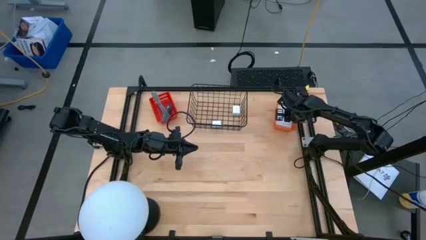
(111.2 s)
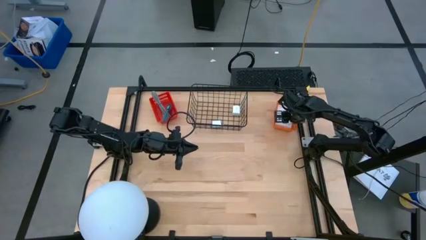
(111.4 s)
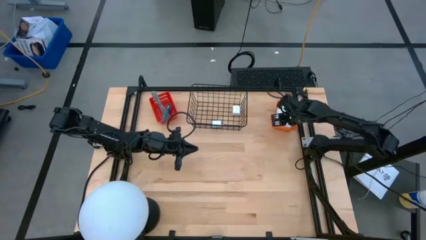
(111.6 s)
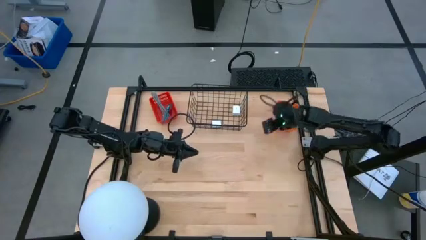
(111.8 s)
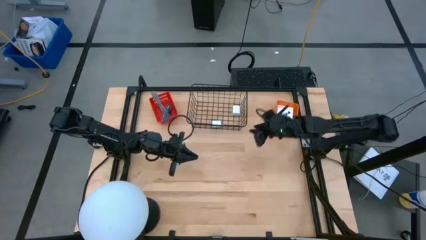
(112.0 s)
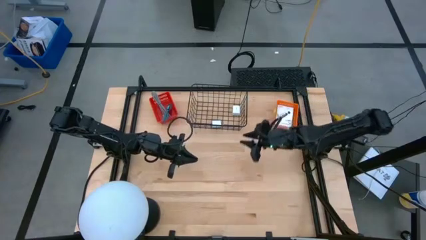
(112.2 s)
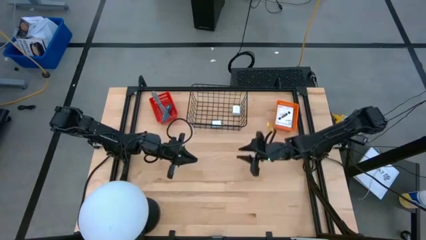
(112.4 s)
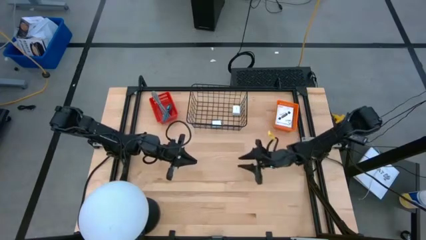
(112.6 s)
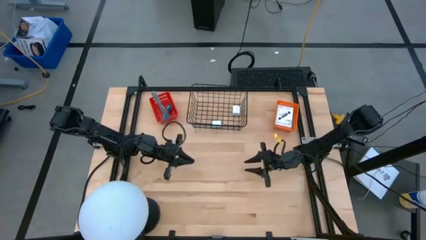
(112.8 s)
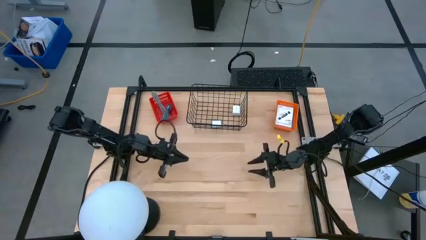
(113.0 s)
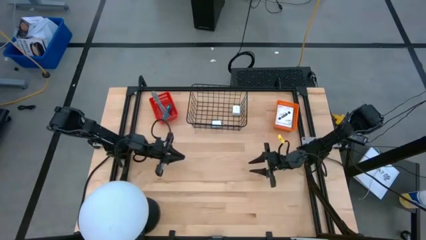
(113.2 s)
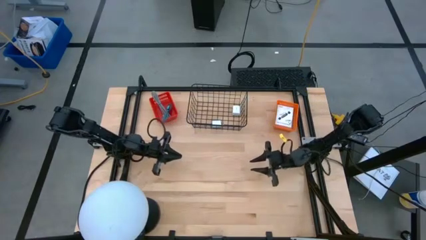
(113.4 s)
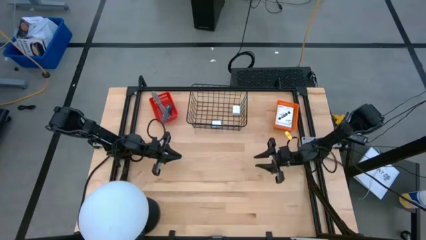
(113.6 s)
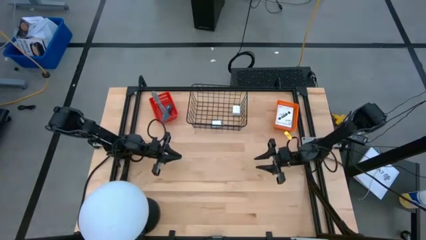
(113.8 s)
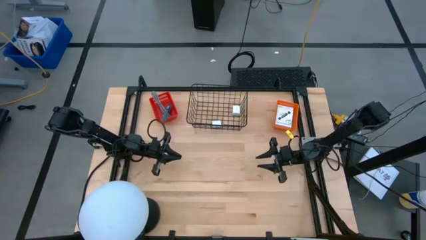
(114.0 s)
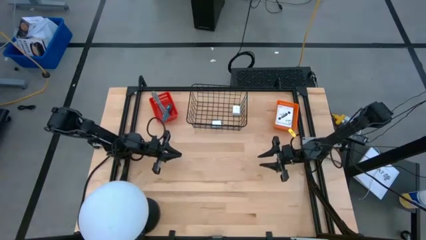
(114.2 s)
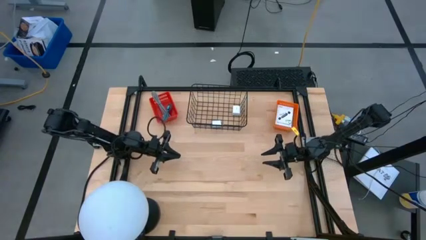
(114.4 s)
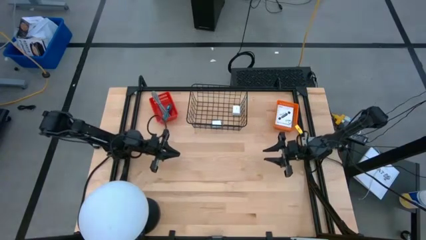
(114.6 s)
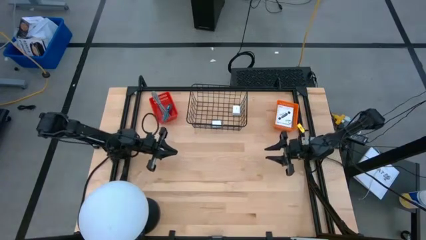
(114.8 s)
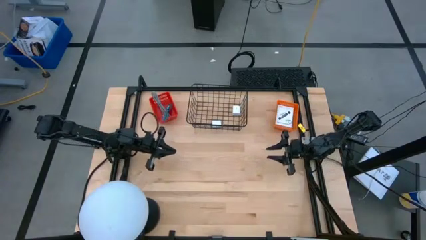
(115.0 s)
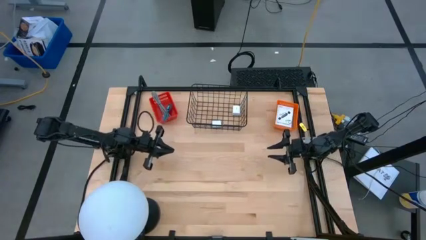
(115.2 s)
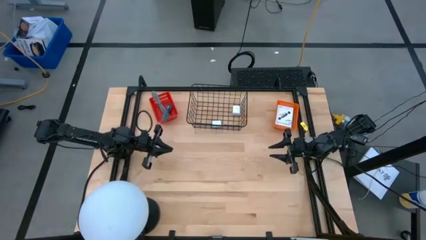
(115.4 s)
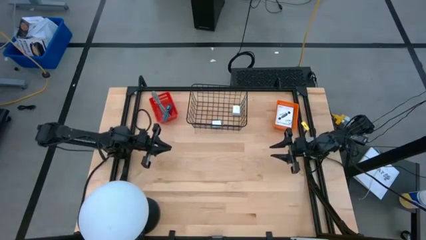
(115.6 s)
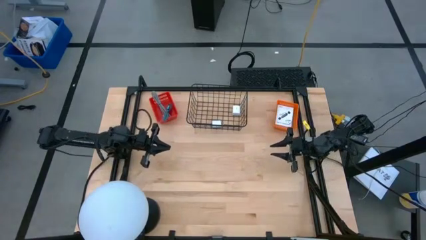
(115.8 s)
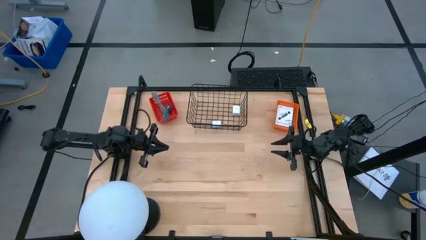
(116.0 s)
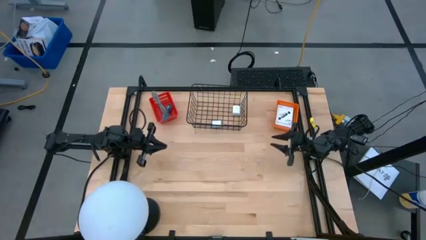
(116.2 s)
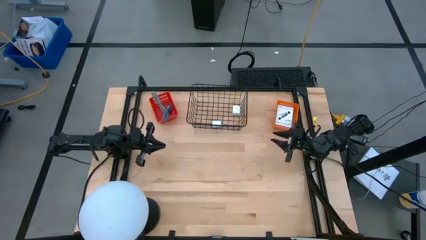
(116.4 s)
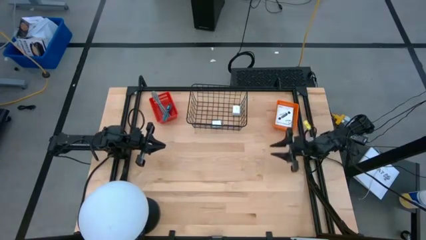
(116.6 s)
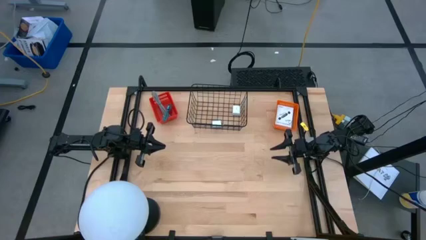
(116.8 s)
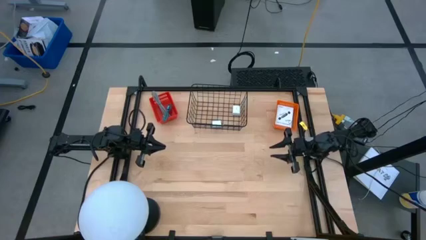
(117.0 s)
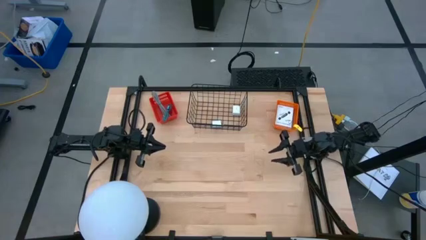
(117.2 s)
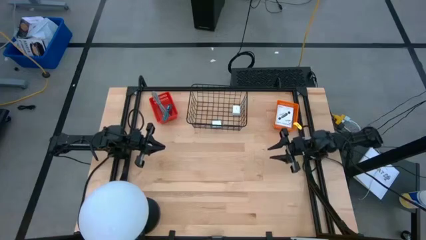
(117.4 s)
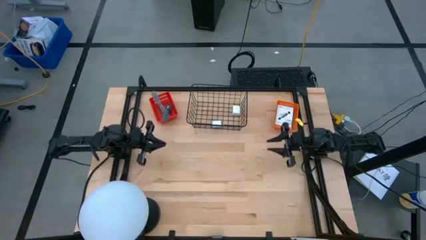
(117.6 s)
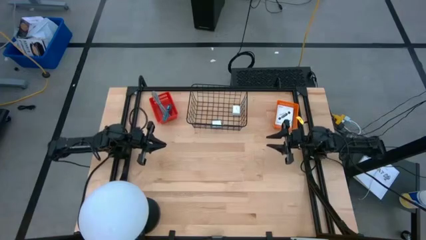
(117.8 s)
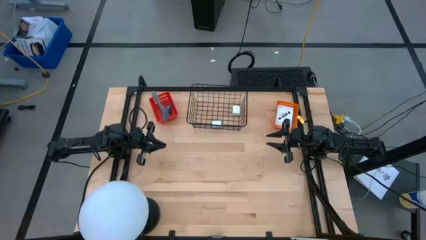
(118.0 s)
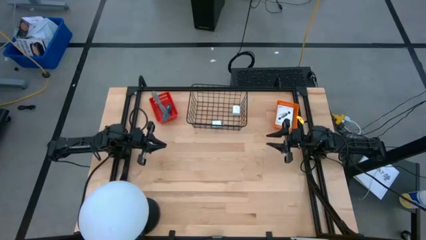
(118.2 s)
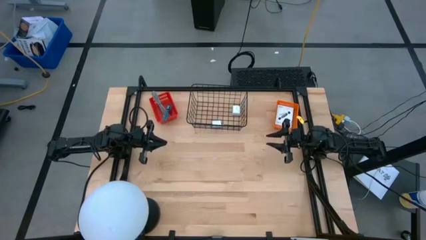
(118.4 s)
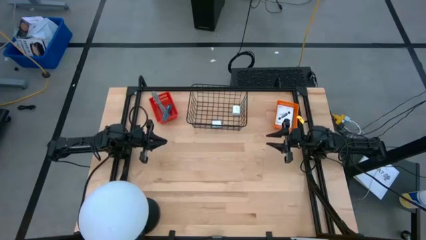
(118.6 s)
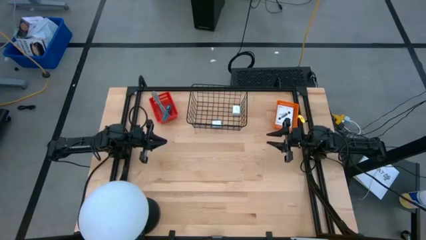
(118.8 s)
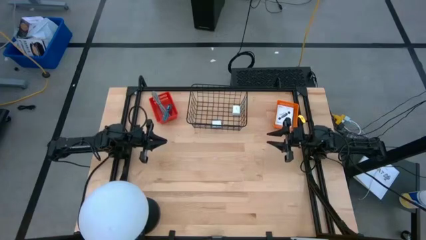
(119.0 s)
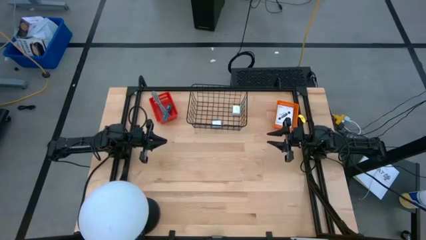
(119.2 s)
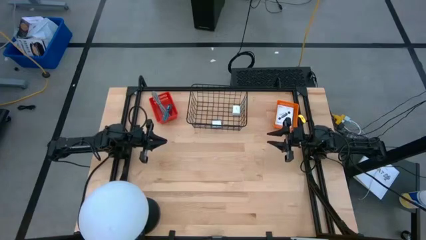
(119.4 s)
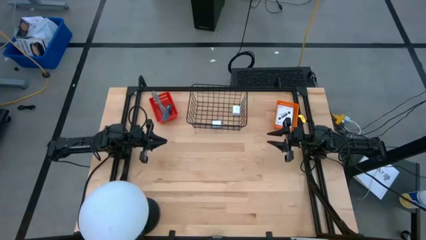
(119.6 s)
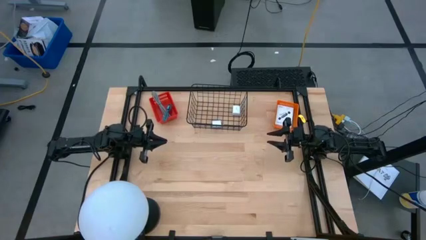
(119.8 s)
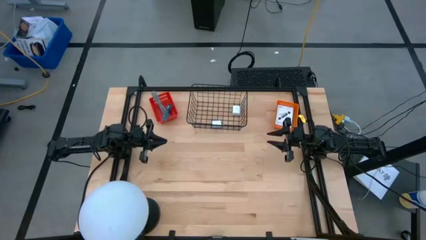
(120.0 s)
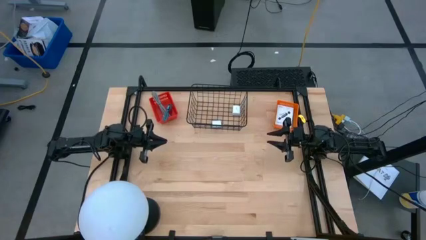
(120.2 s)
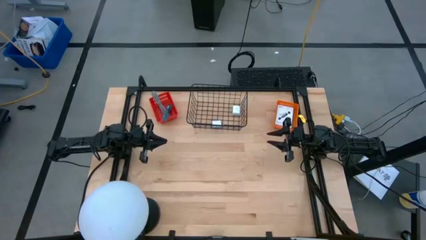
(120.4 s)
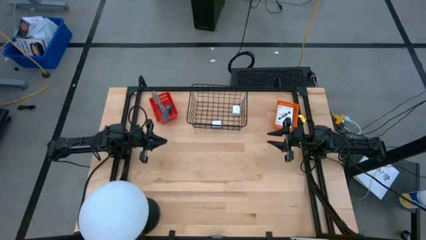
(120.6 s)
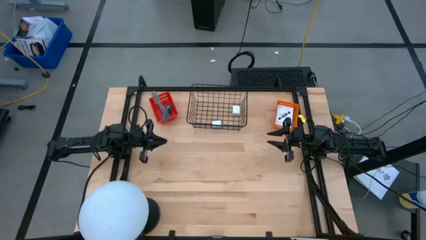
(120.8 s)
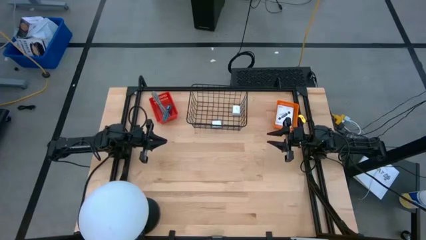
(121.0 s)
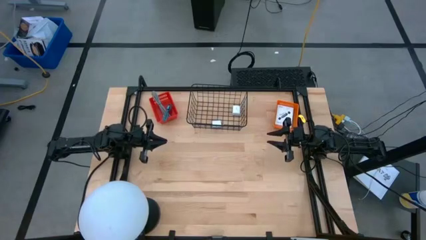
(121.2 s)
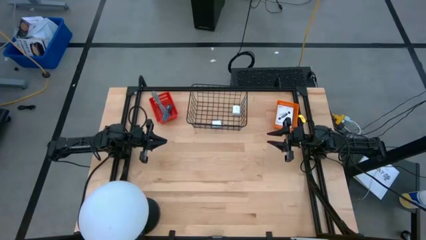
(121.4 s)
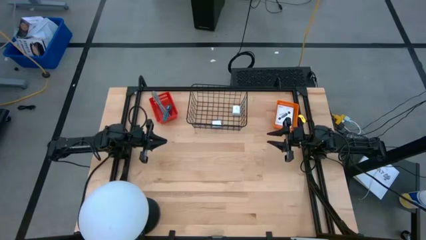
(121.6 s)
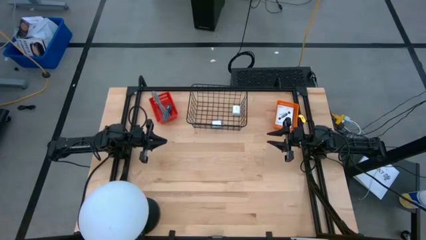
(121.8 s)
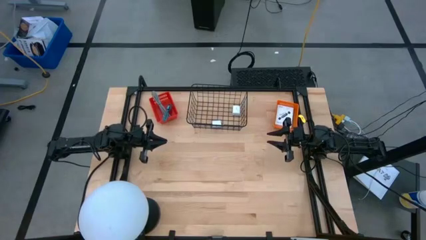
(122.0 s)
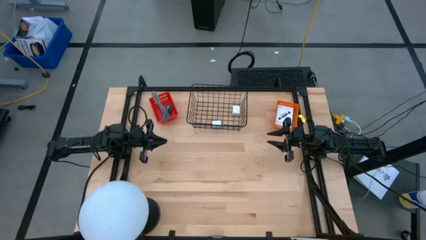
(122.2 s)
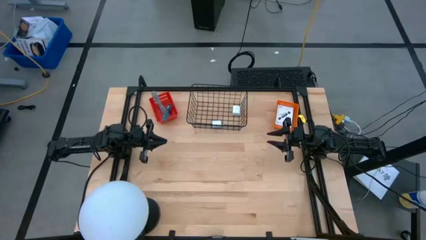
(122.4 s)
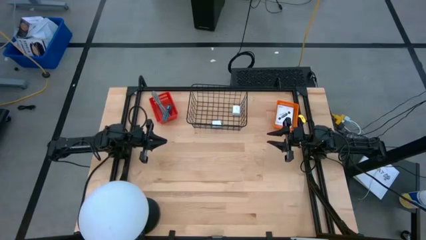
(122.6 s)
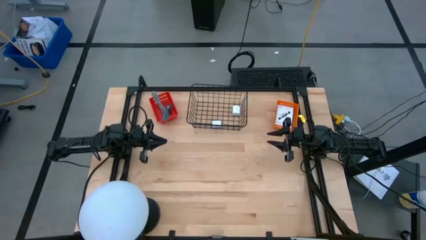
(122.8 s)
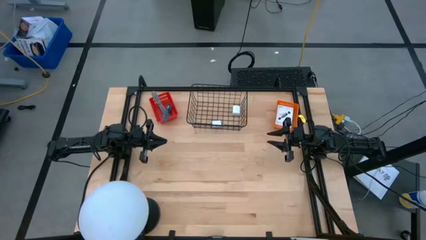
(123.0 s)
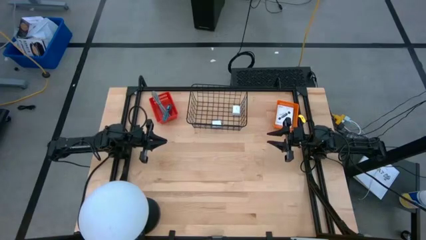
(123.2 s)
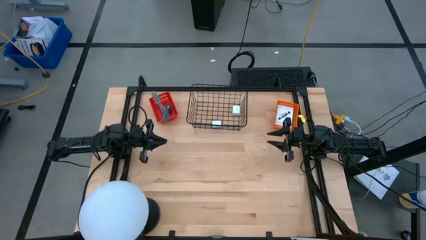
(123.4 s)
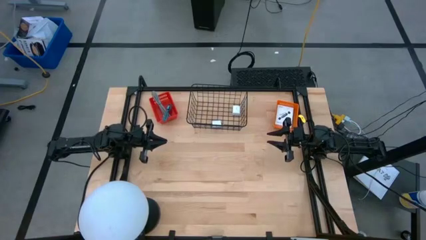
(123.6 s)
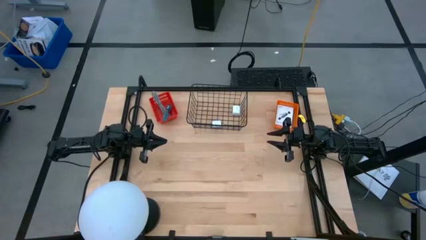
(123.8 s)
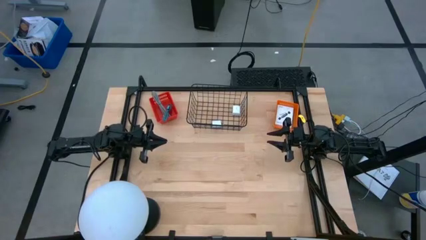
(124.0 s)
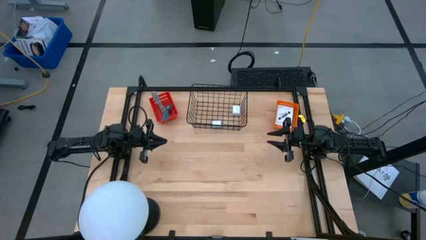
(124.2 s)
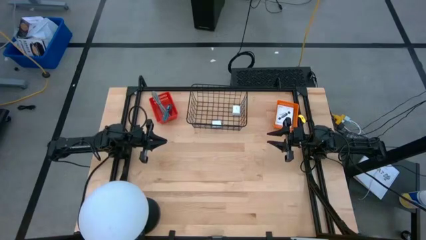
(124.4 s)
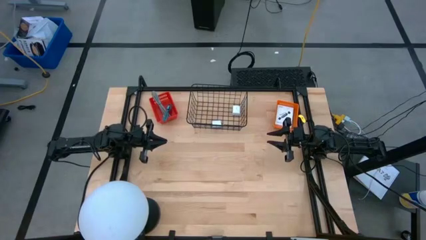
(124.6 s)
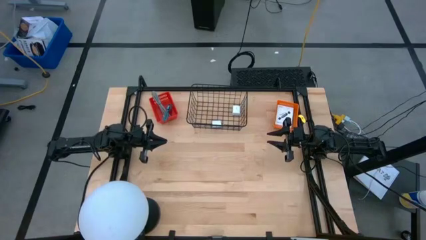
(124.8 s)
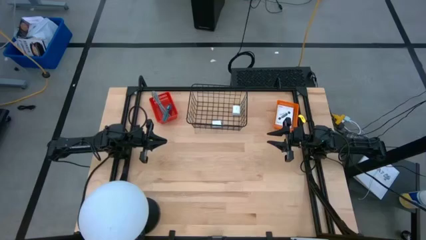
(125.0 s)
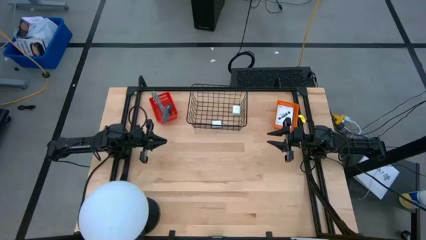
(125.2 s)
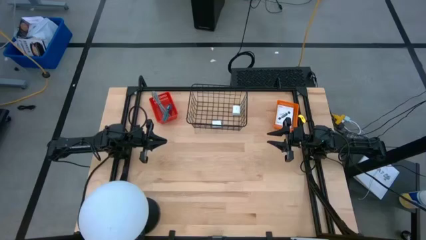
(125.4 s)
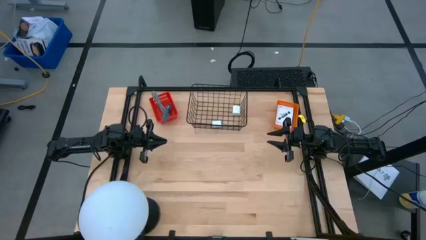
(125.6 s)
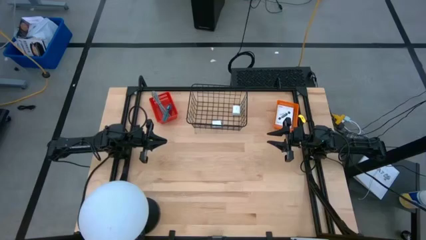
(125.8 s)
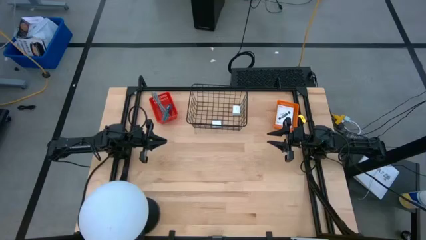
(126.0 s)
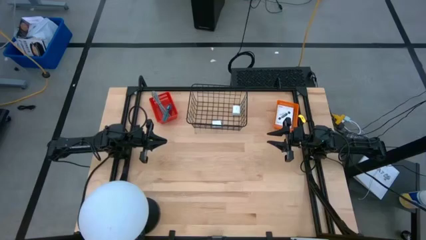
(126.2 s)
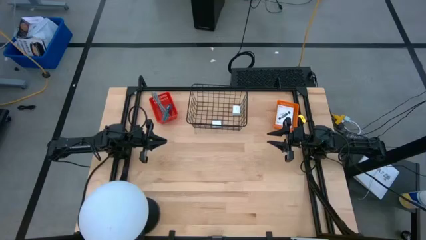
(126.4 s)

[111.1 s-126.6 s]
Task: Pick and place items into bin
Return to Home Position
